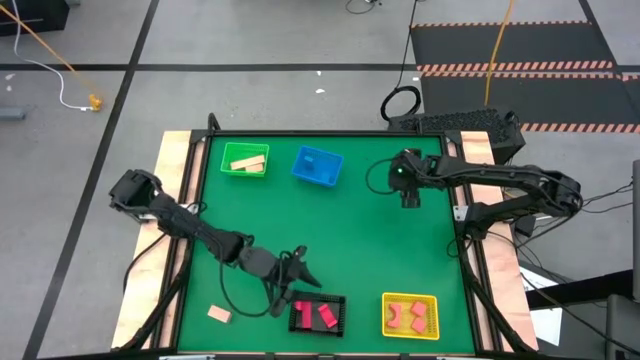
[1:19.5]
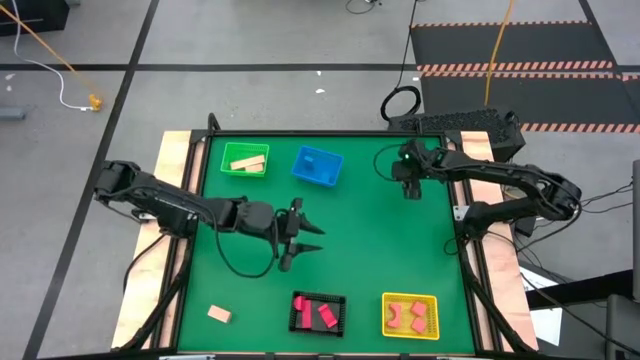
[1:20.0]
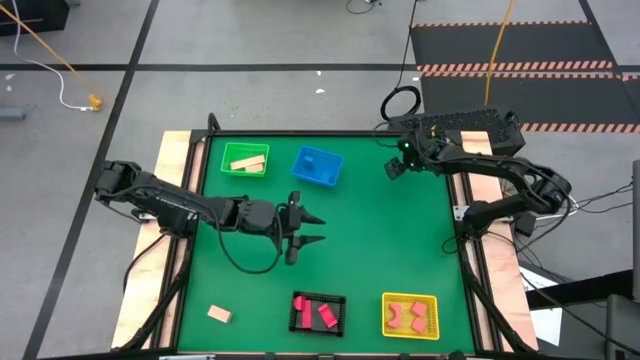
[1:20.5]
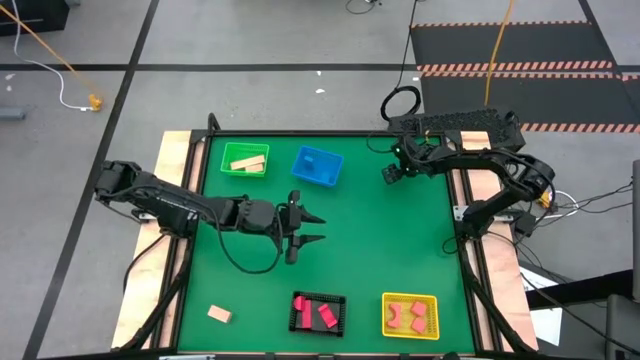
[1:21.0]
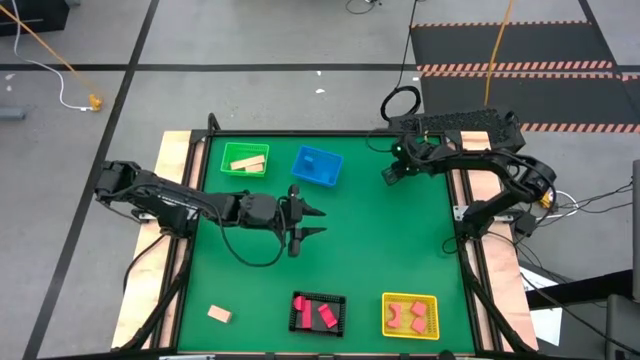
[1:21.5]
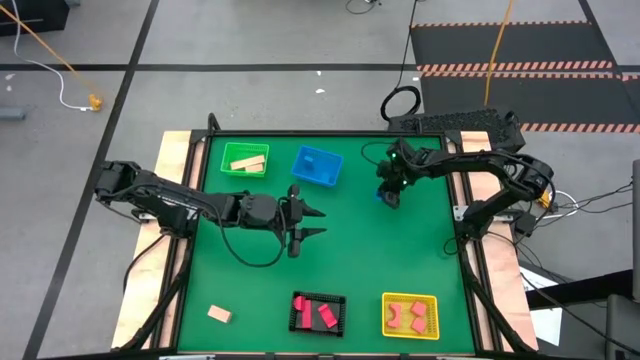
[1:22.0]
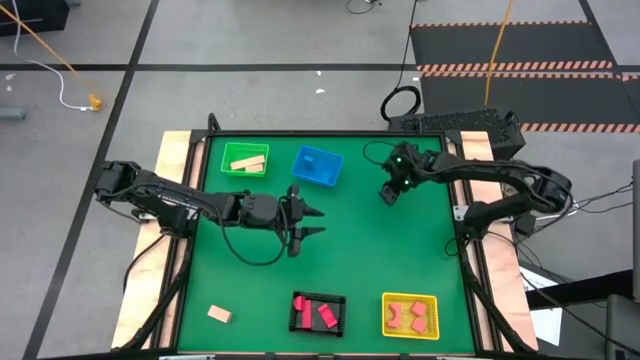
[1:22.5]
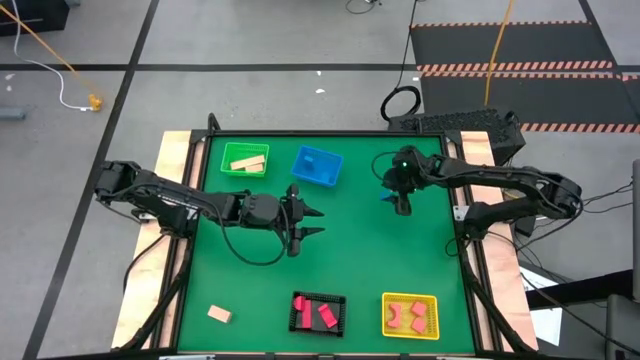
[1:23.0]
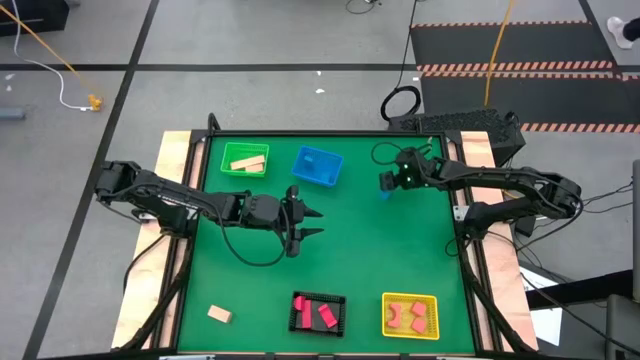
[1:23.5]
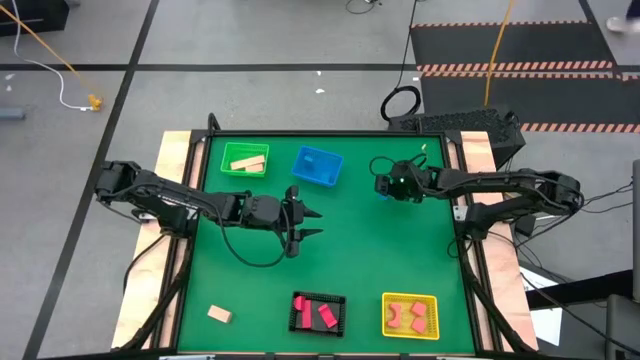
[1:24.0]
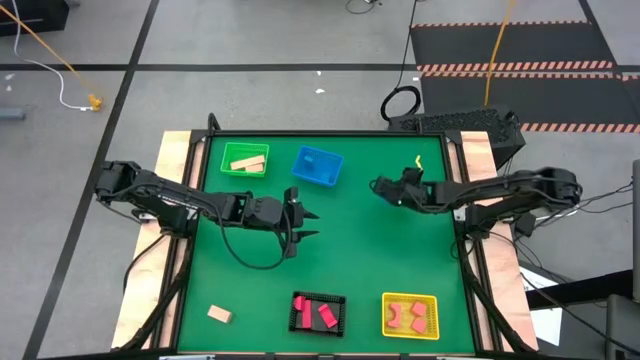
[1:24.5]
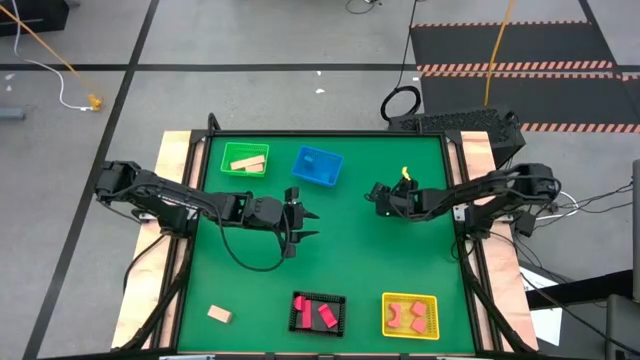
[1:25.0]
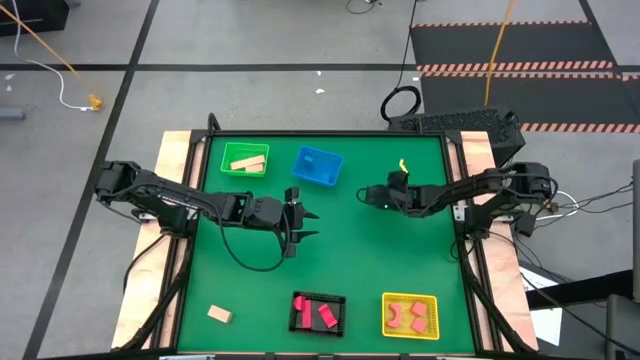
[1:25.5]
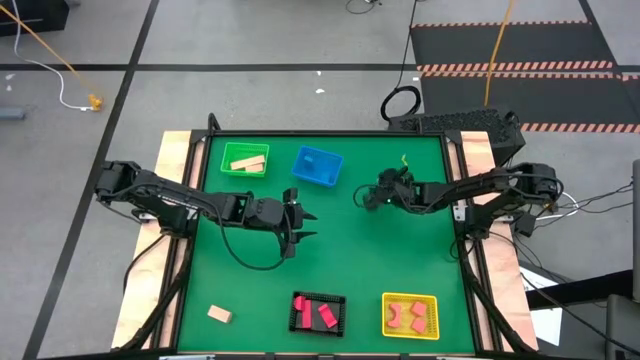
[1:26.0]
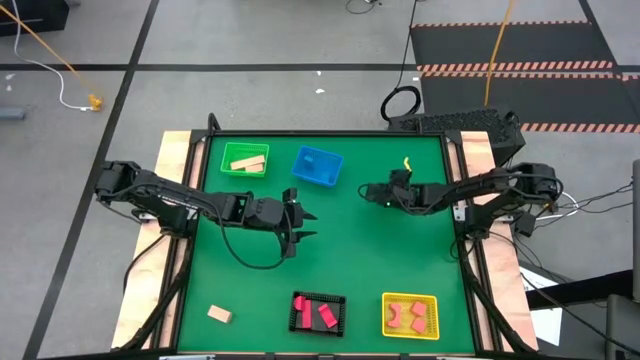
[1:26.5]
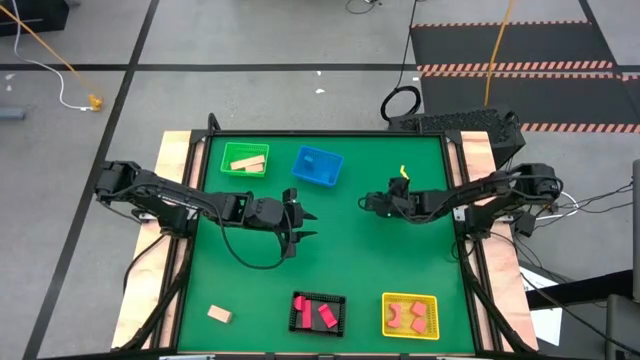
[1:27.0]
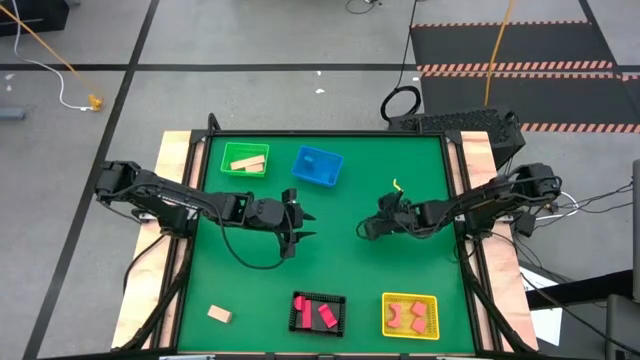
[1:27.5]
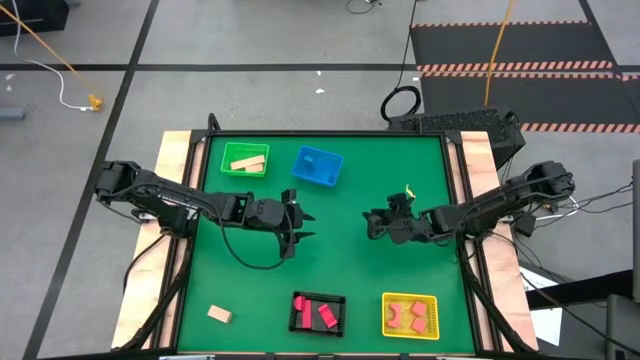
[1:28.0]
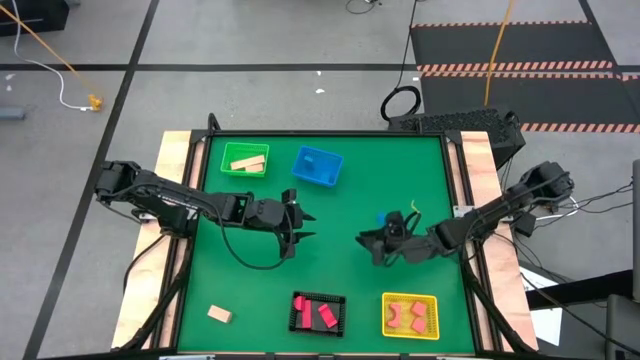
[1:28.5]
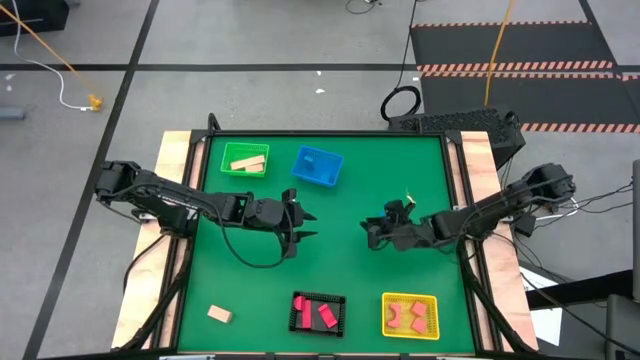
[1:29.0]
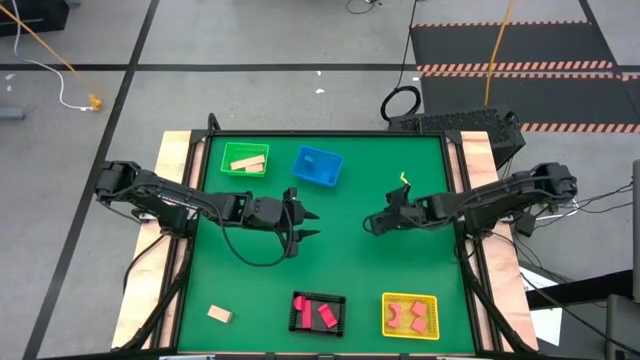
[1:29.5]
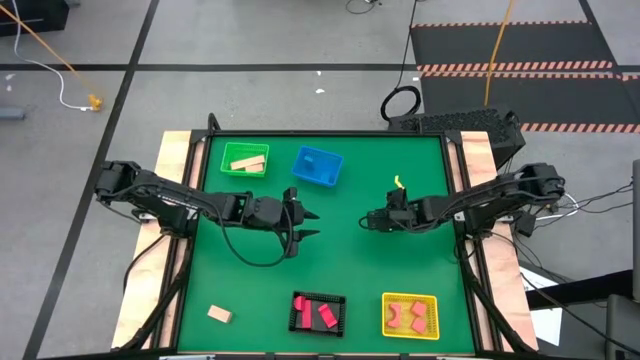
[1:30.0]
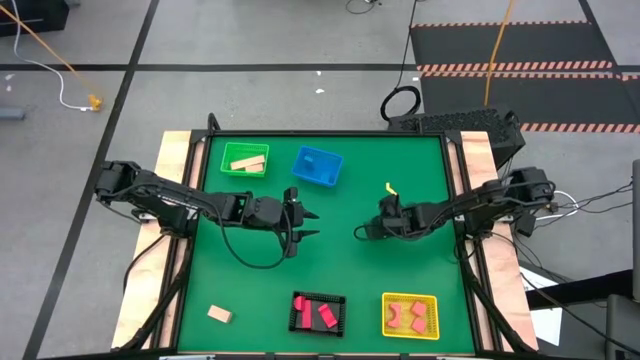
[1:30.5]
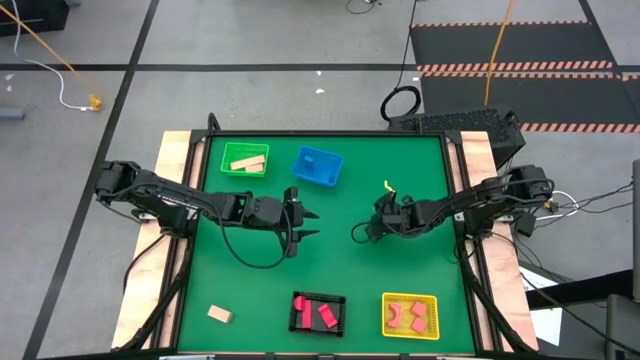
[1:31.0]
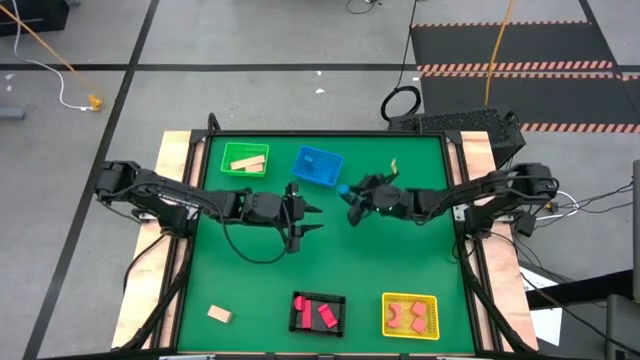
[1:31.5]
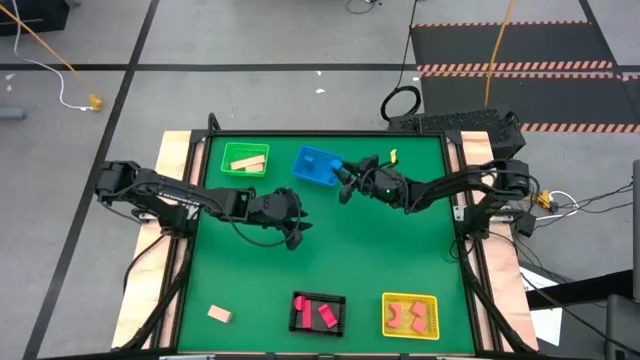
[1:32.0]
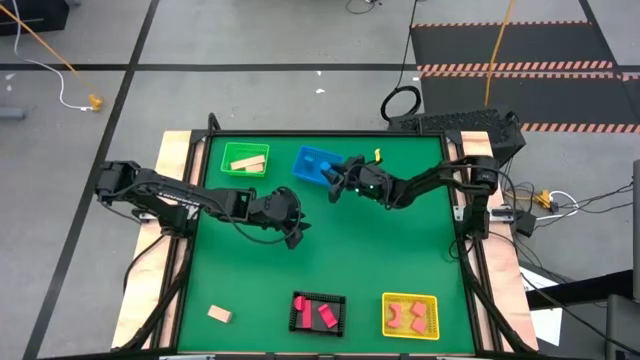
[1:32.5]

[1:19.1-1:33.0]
Task: Sort & place blocks by color
Put the blue wooden block into the blue basket

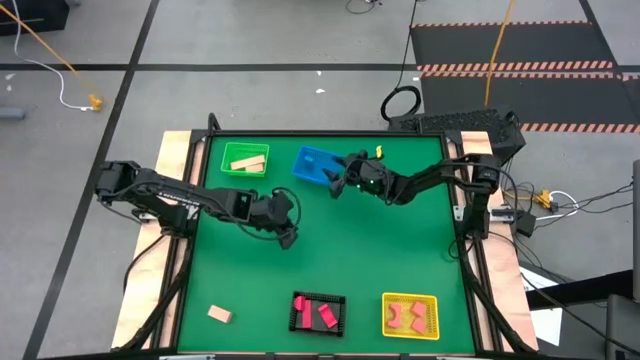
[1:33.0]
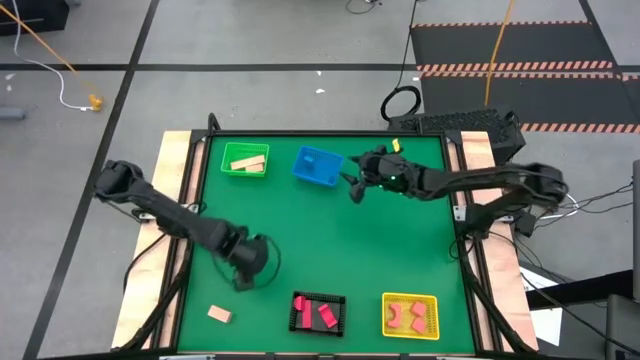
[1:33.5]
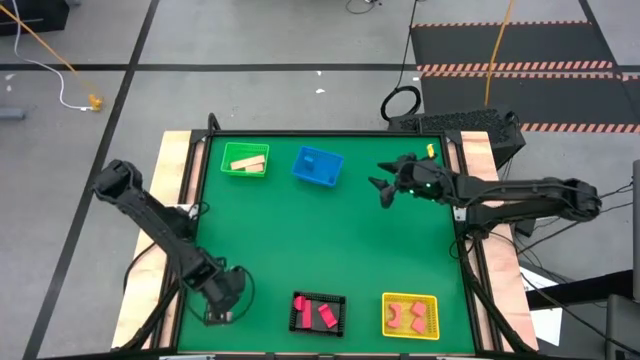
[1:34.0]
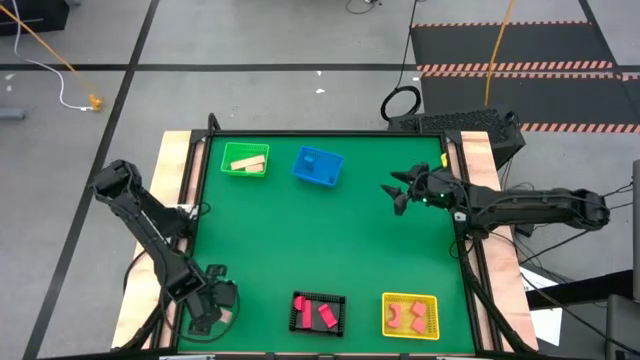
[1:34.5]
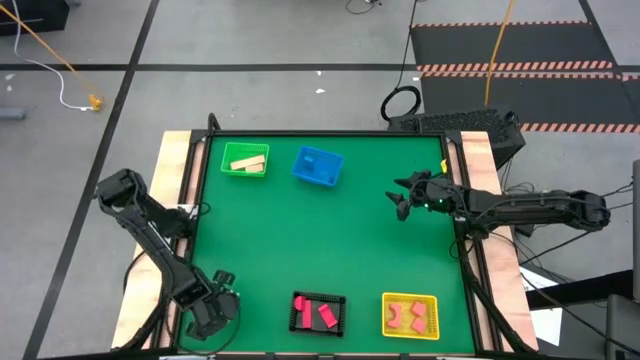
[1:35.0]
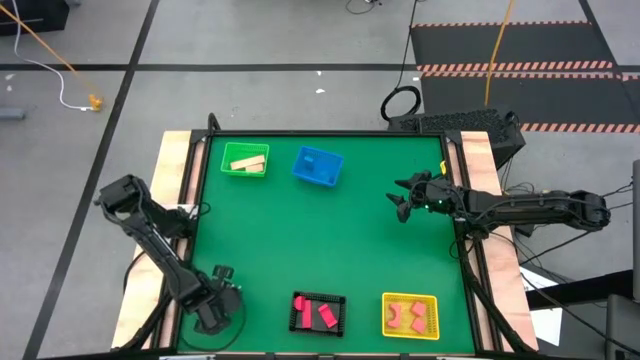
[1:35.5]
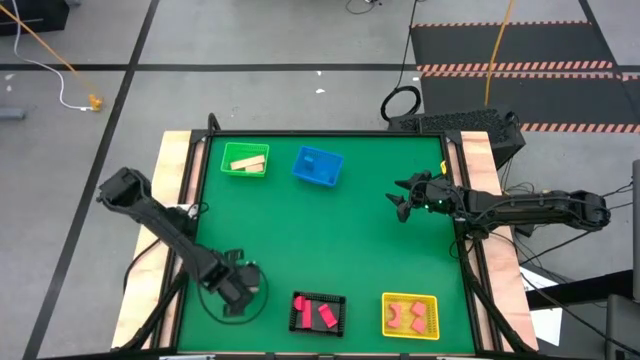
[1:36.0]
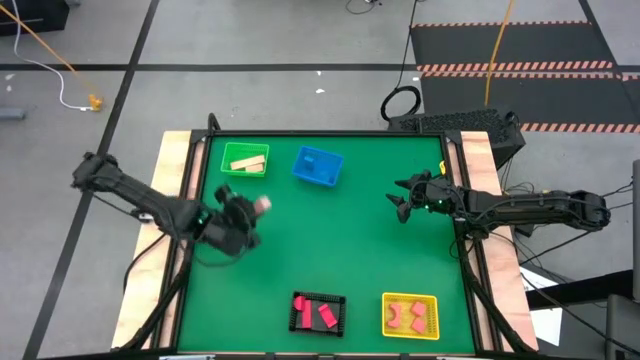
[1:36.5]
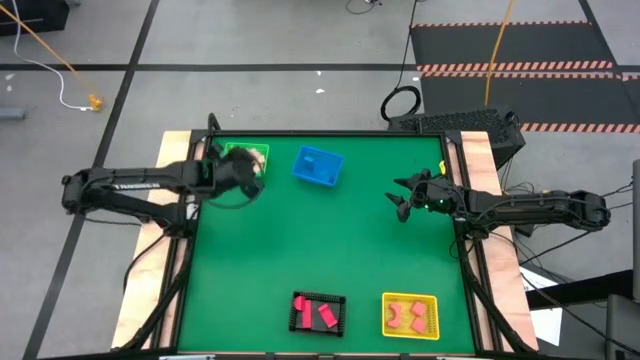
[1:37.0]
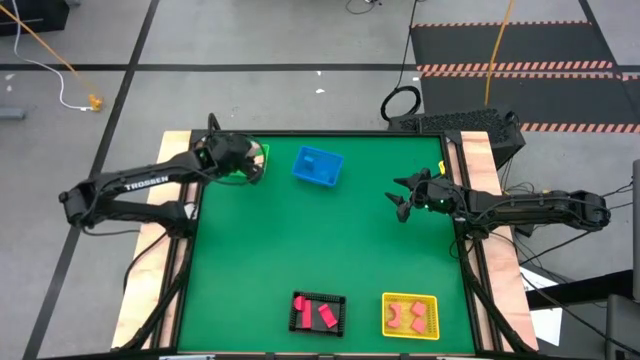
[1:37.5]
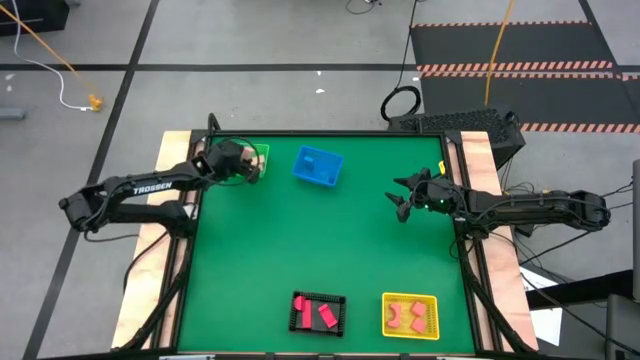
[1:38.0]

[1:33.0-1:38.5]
Put the brown wooden block into the green basket
